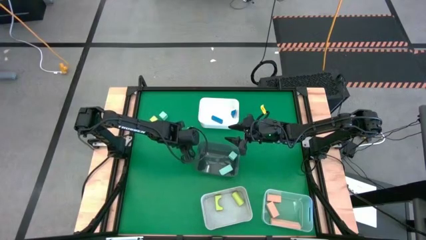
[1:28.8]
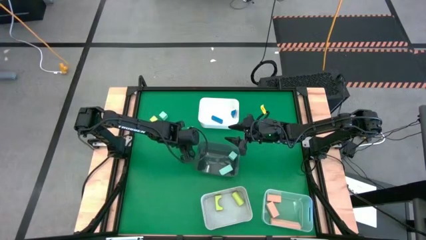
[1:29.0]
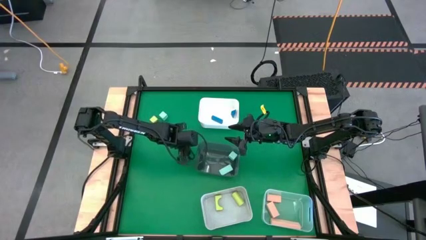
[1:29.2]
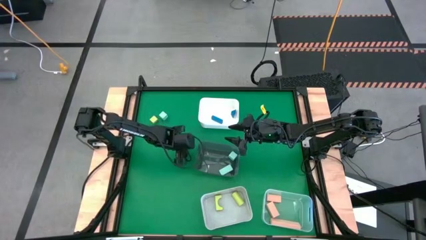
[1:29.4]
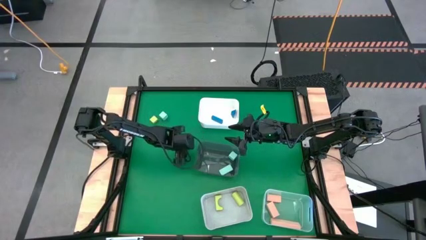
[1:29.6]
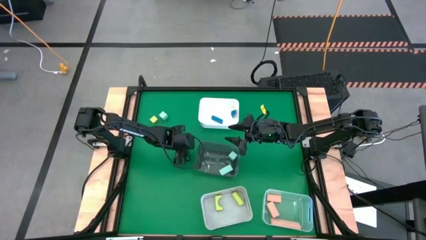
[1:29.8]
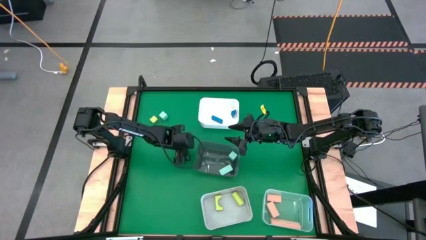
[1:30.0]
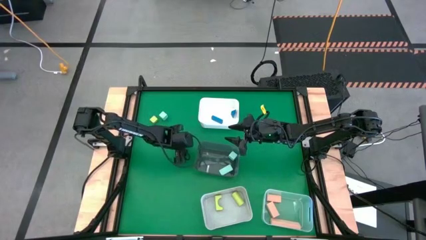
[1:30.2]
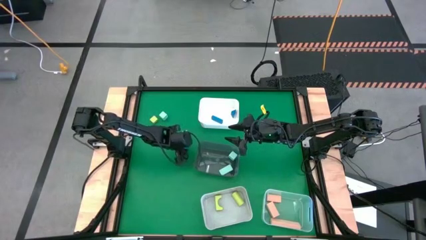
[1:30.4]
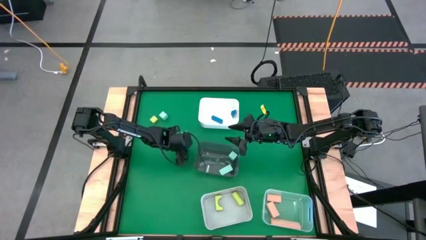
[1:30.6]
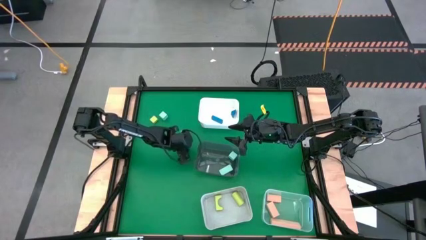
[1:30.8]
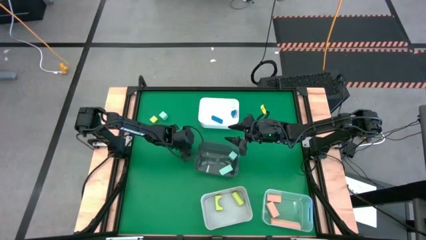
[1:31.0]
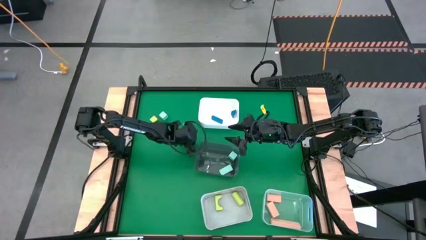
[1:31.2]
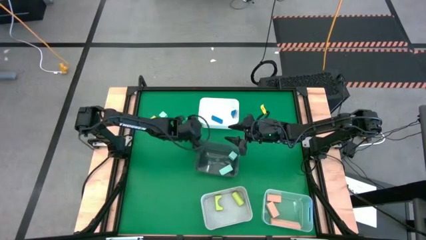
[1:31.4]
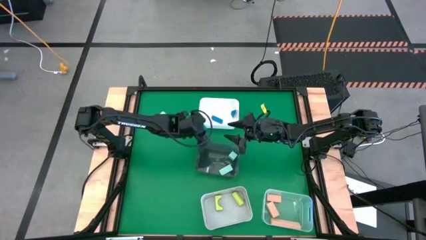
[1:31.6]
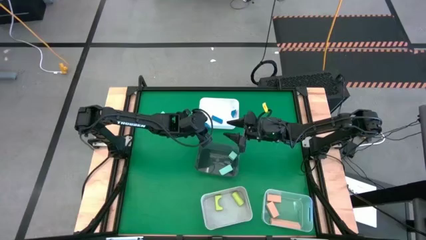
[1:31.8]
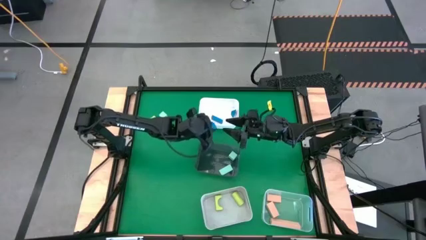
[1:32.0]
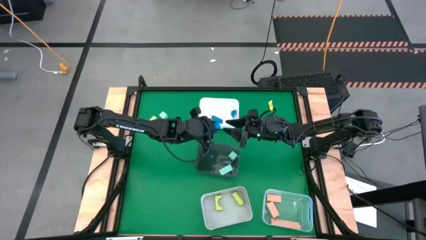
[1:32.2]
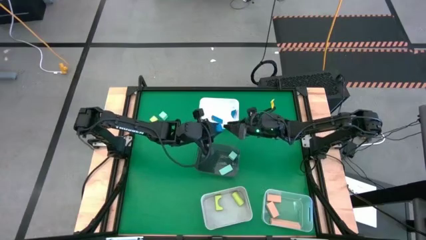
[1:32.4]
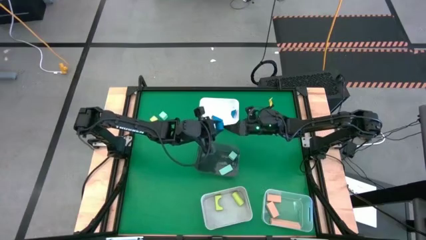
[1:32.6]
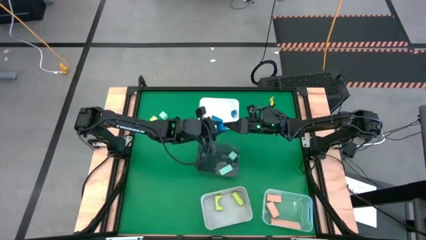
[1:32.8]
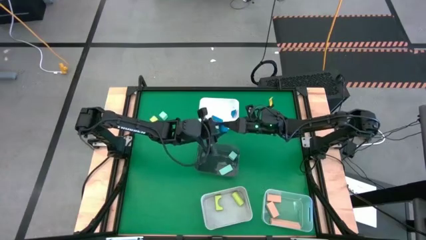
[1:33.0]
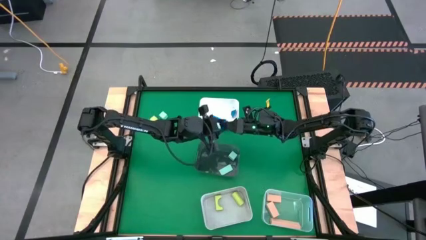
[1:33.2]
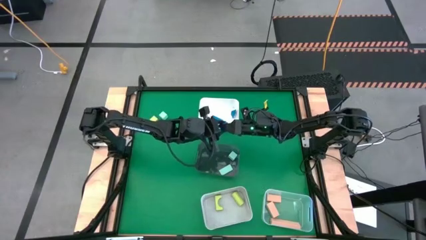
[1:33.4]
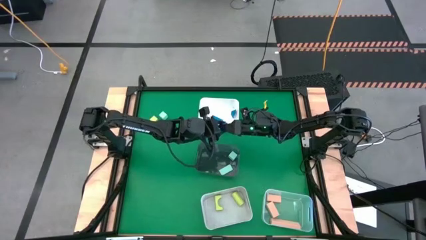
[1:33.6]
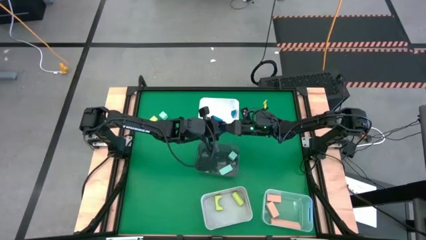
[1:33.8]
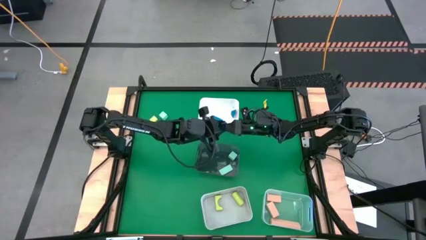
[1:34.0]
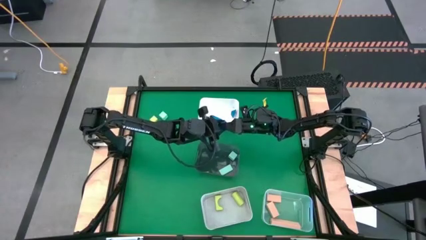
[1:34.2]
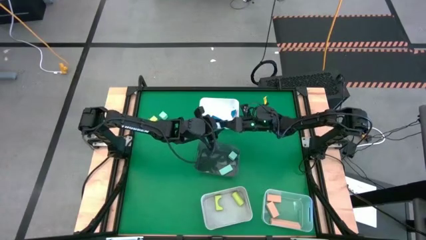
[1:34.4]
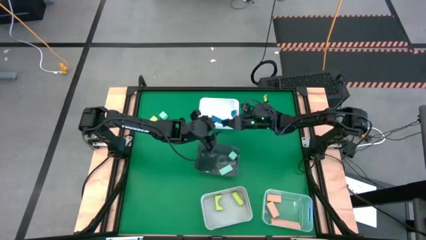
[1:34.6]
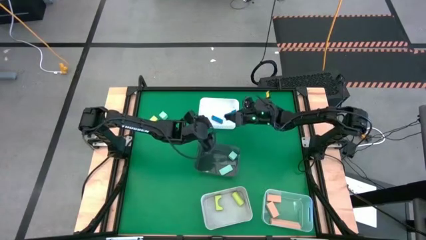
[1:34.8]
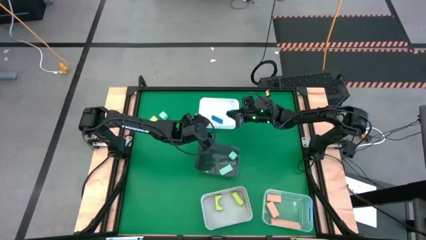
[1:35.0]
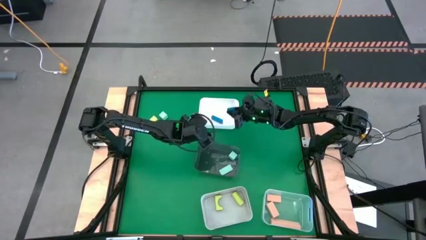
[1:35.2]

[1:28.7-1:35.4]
Task: Sort & place blocks by color
Put the blue block into the white bin

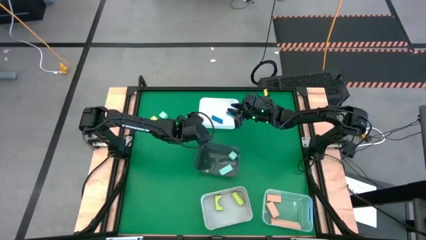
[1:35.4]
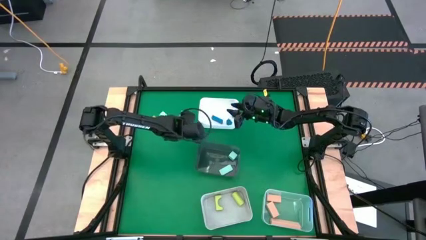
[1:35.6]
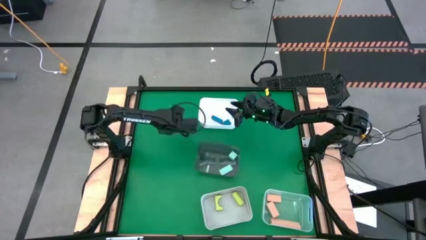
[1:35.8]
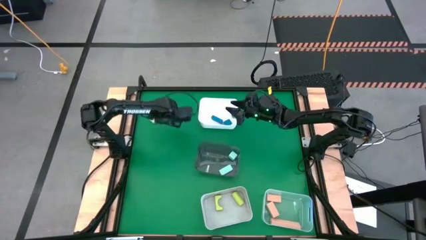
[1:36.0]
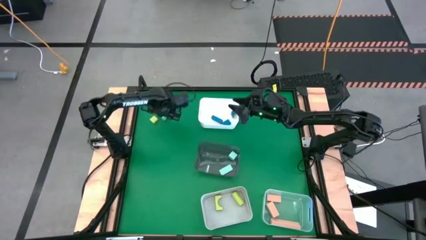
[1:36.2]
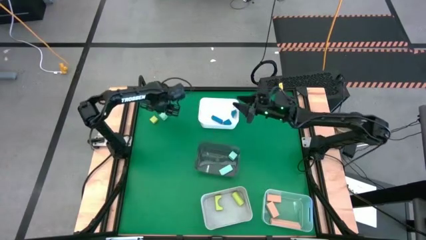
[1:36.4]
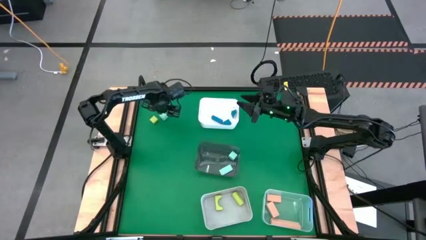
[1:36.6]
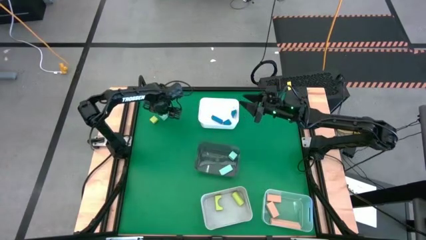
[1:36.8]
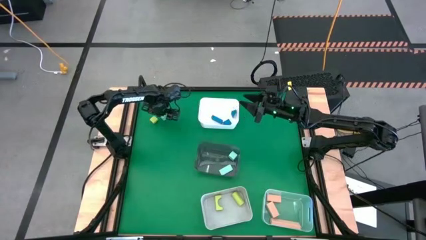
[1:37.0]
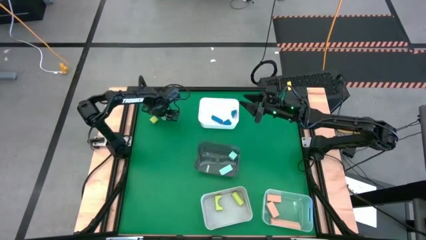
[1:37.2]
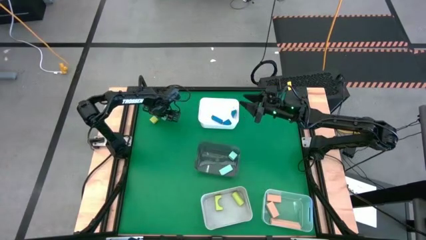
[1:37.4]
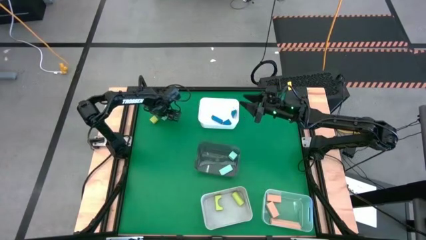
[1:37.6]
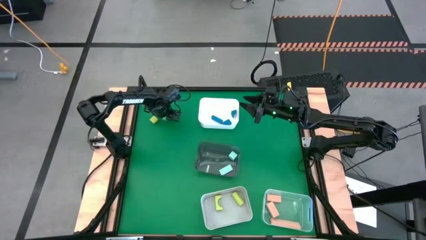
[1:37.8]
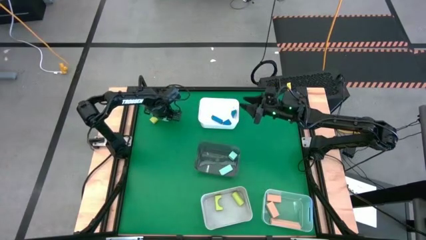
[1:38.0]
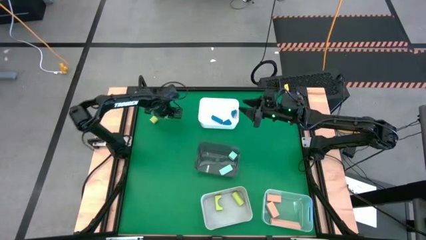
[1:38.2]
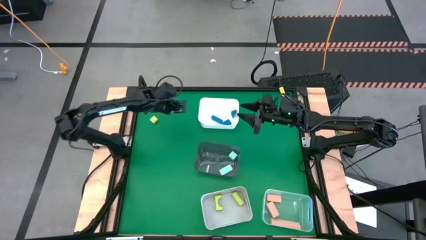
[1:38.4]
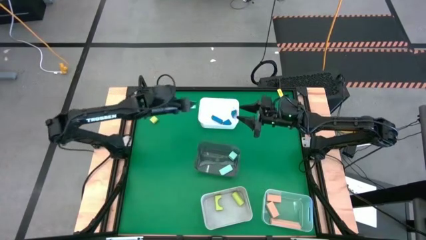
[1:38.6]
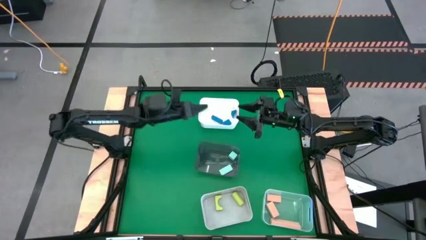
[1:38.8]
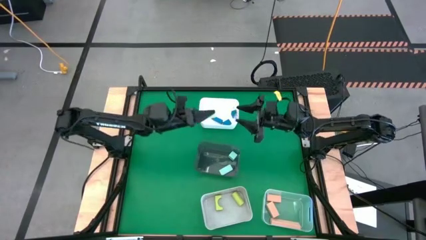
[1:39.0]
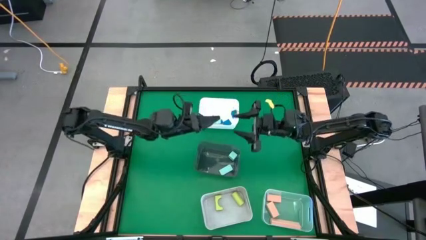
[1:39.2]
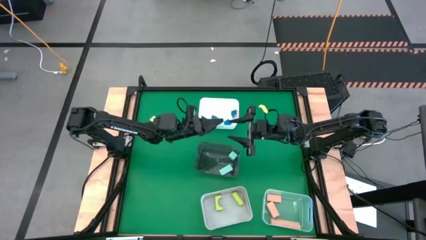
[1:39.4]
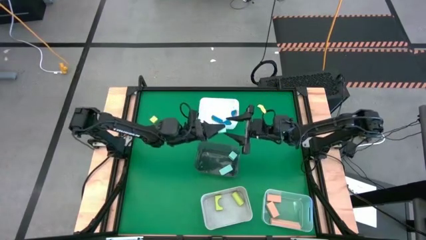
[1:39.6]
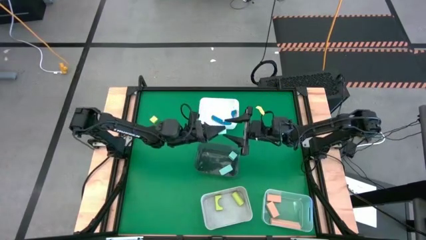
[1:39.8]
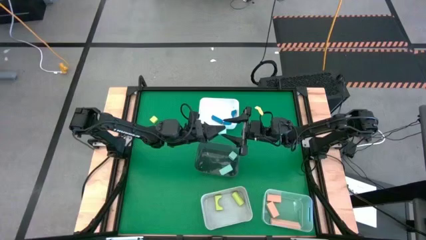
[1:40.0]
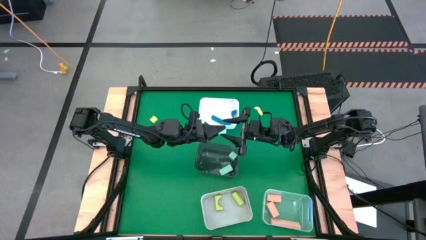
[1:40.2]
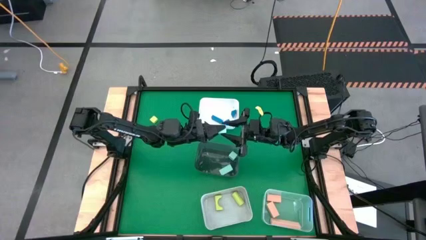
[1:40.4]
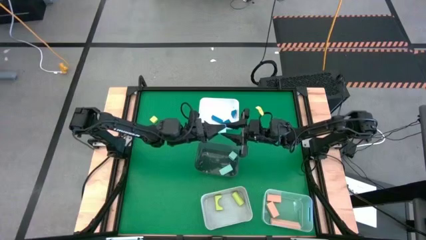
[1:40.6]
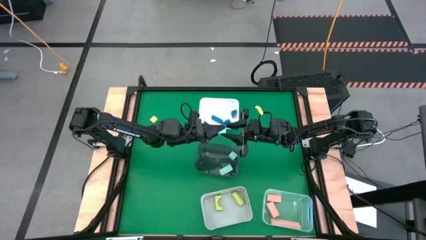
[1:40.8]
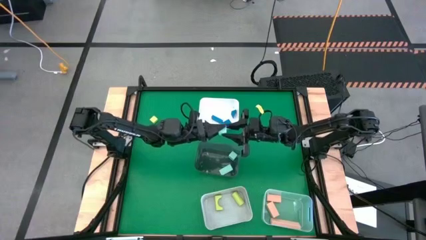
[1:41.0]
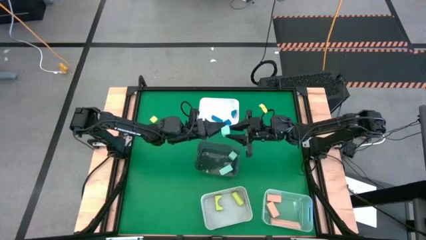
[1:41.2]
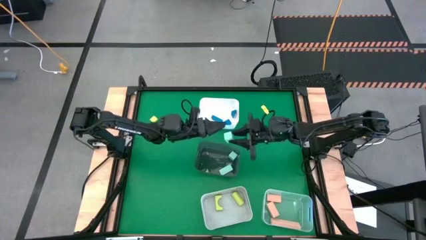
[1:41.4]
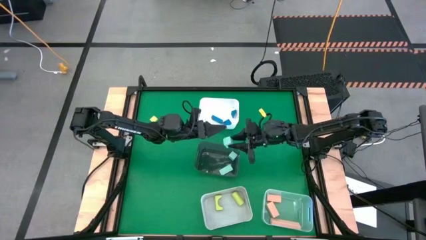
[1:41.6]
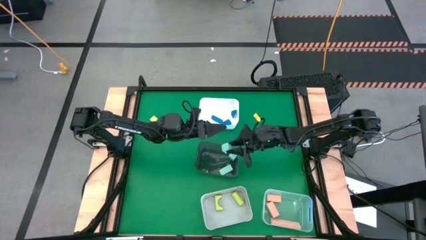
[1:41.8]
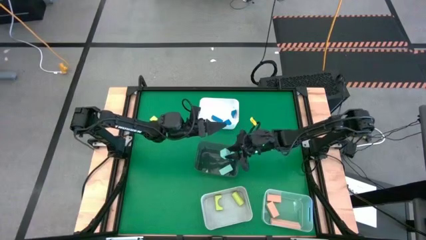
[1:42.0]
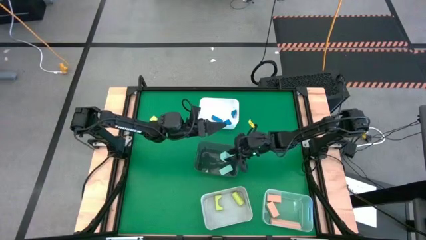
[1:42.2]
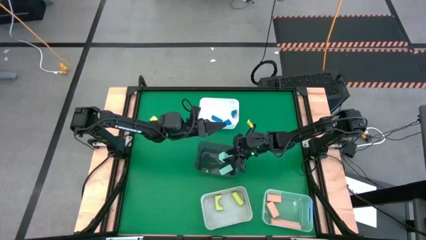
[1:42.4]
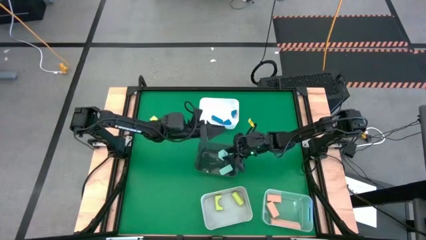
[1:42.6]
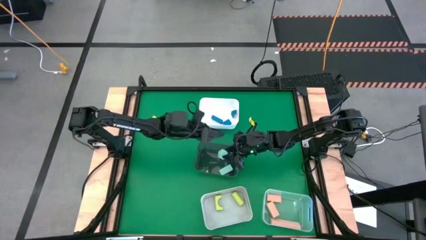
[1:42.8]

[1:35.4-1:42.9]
Put the light blue block into the black bin
